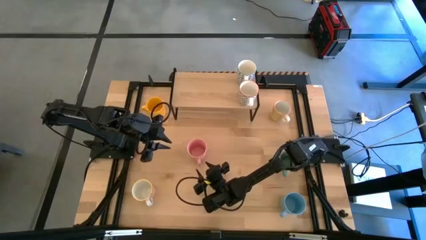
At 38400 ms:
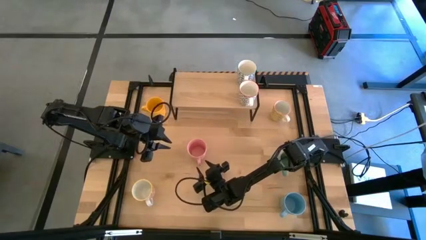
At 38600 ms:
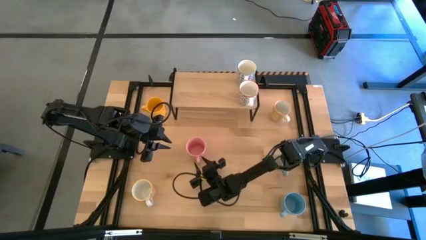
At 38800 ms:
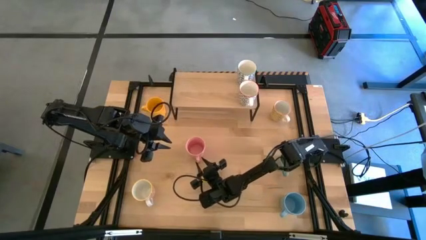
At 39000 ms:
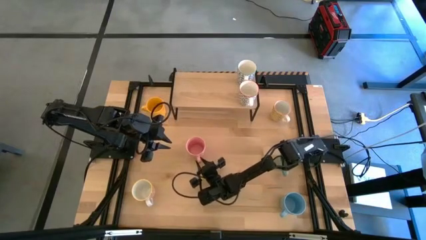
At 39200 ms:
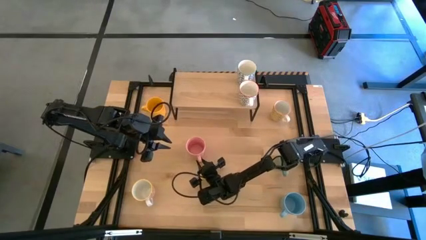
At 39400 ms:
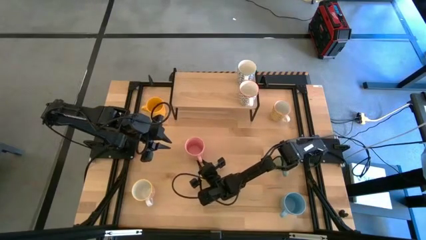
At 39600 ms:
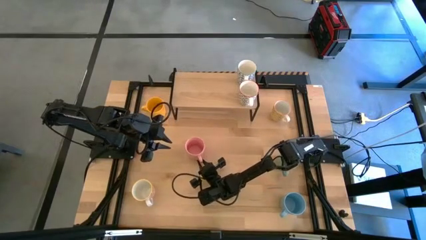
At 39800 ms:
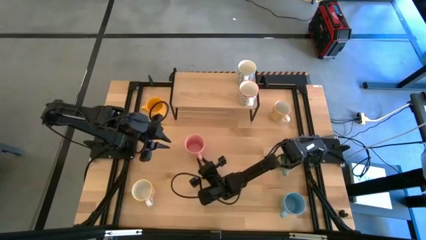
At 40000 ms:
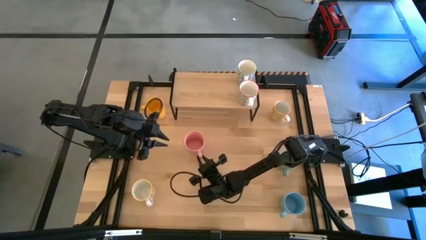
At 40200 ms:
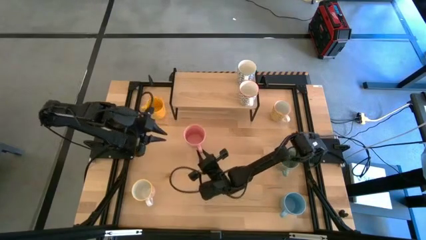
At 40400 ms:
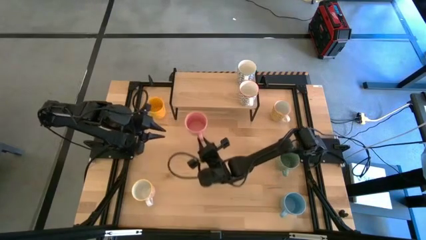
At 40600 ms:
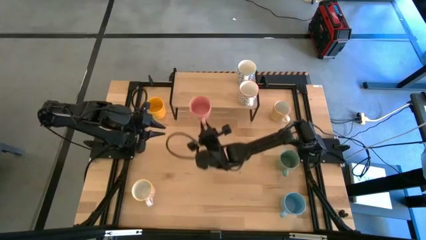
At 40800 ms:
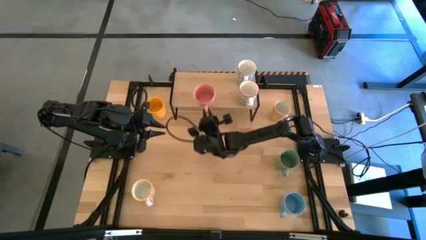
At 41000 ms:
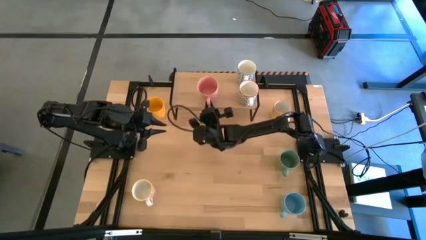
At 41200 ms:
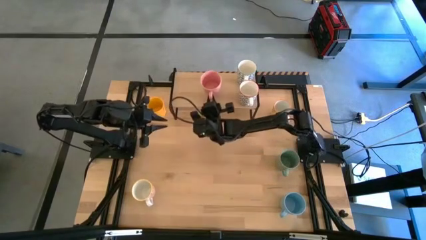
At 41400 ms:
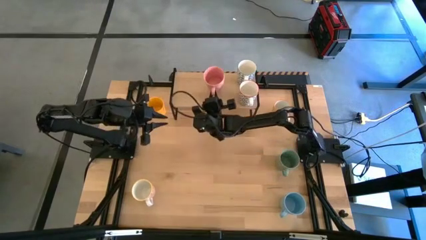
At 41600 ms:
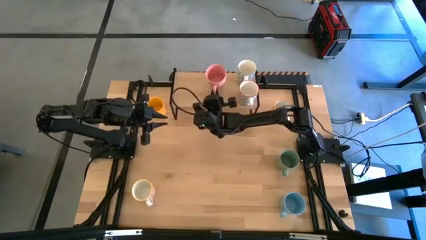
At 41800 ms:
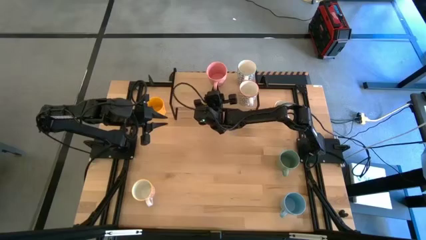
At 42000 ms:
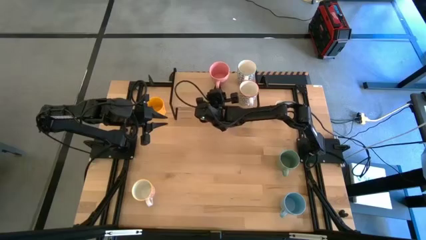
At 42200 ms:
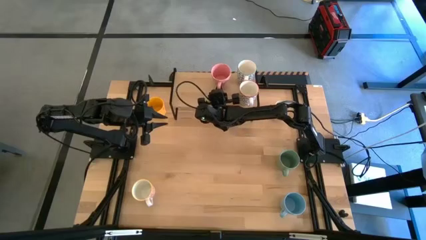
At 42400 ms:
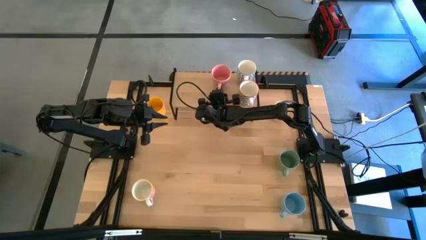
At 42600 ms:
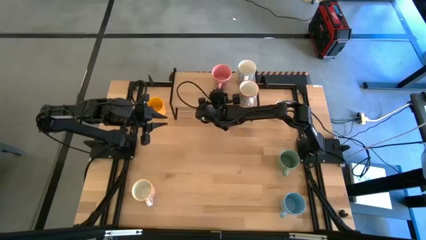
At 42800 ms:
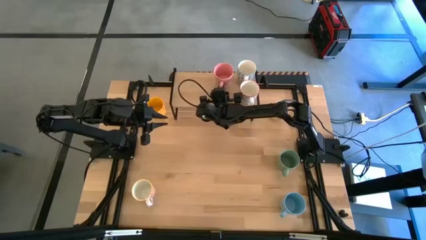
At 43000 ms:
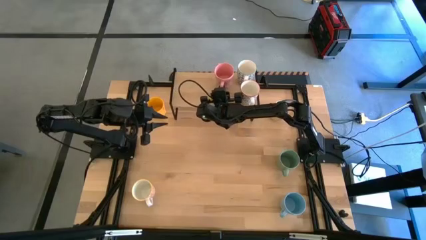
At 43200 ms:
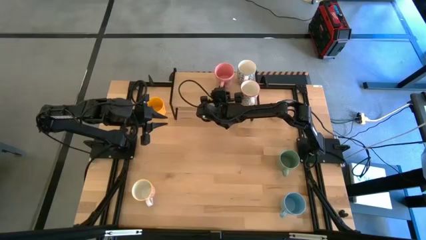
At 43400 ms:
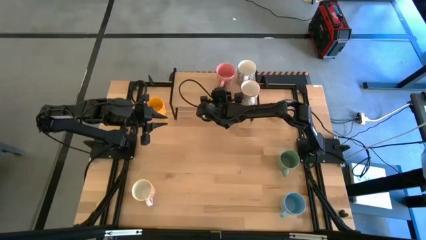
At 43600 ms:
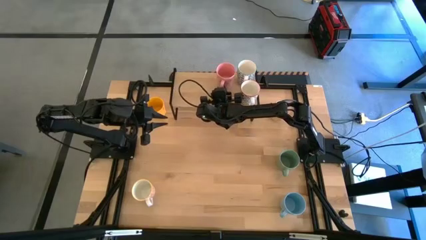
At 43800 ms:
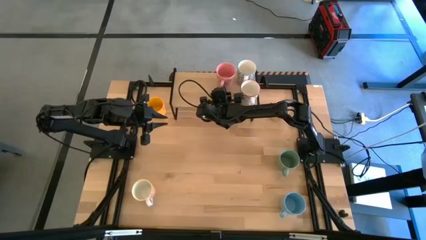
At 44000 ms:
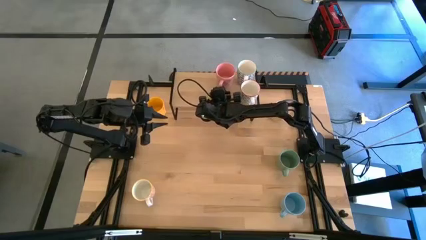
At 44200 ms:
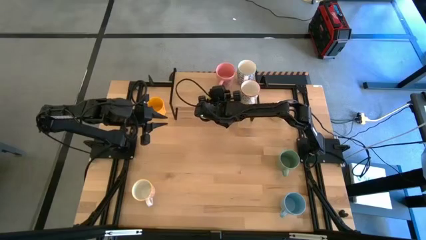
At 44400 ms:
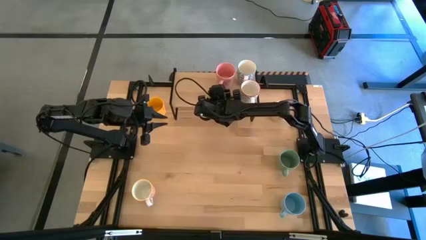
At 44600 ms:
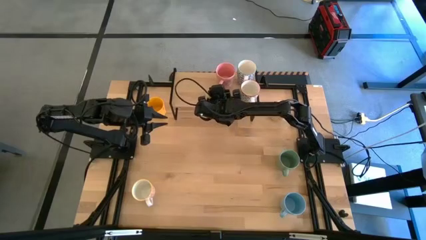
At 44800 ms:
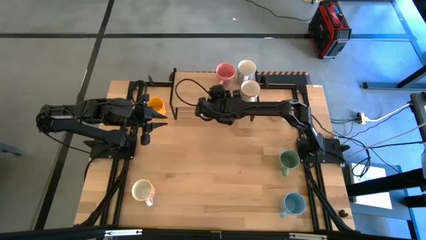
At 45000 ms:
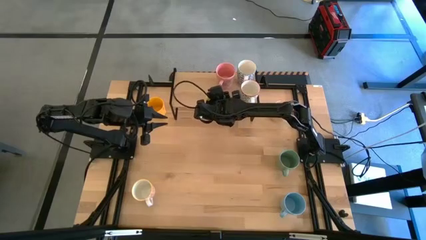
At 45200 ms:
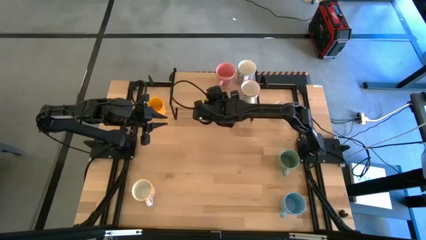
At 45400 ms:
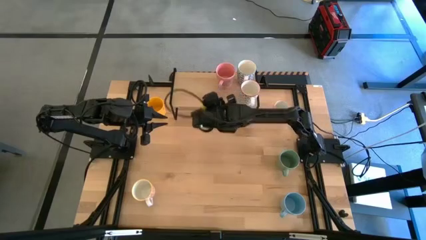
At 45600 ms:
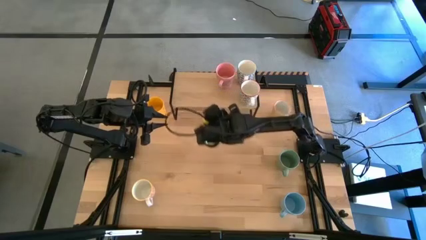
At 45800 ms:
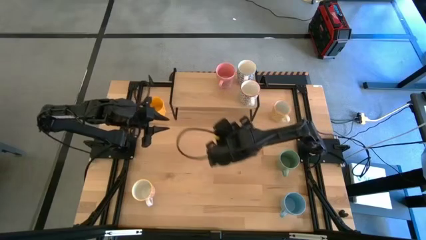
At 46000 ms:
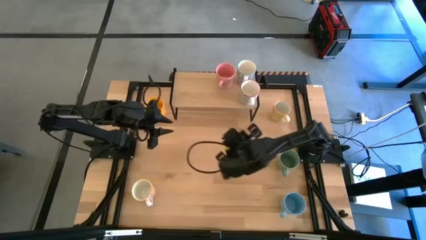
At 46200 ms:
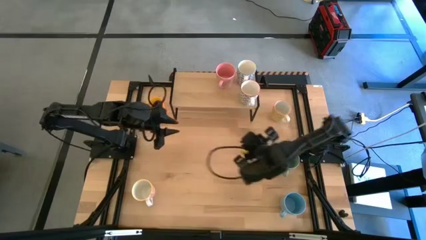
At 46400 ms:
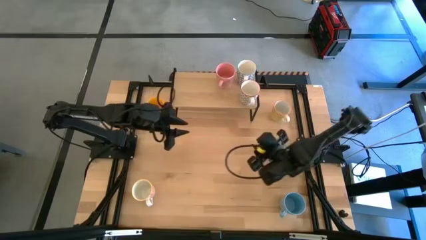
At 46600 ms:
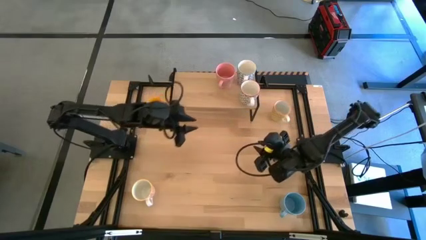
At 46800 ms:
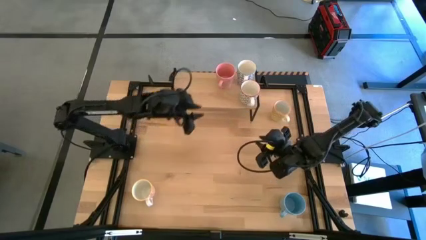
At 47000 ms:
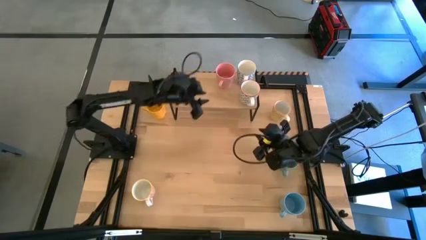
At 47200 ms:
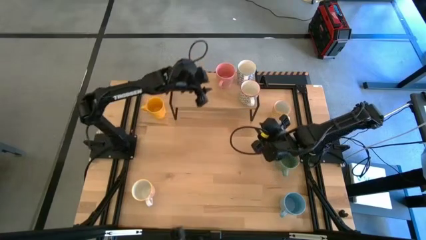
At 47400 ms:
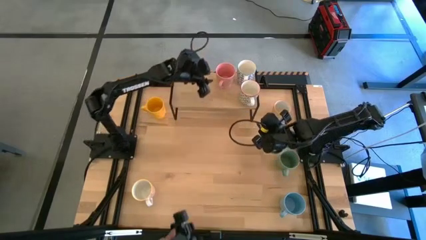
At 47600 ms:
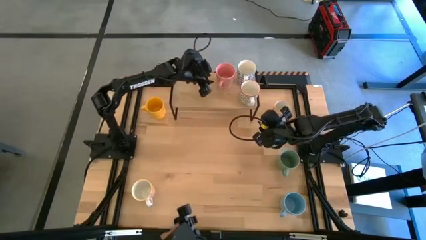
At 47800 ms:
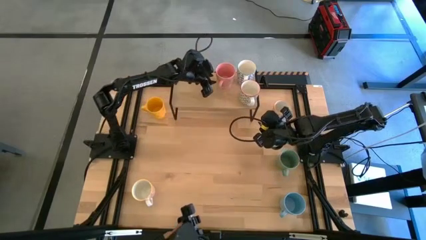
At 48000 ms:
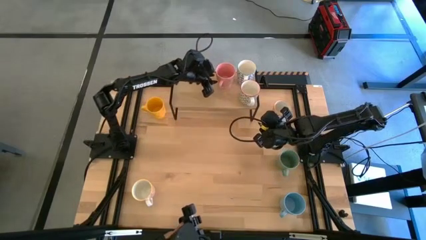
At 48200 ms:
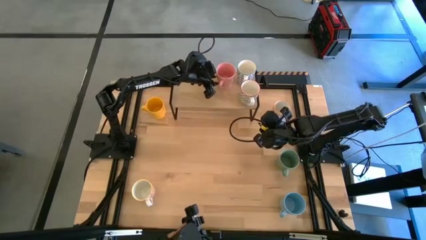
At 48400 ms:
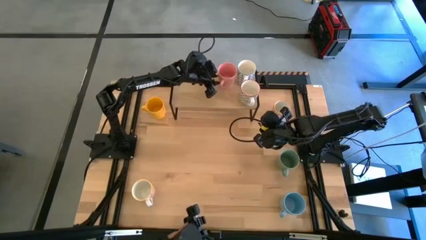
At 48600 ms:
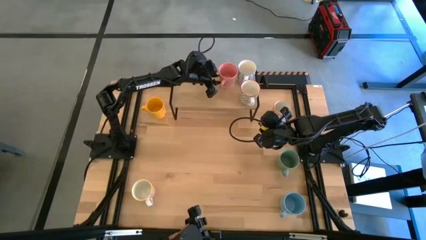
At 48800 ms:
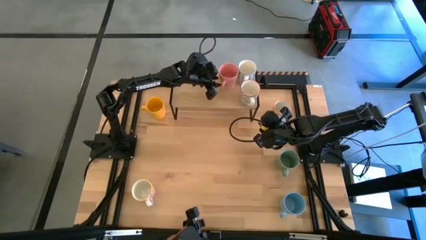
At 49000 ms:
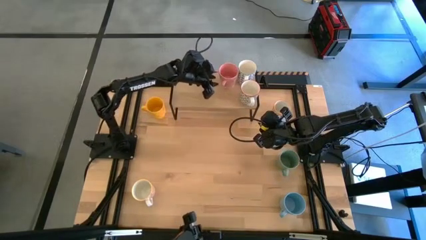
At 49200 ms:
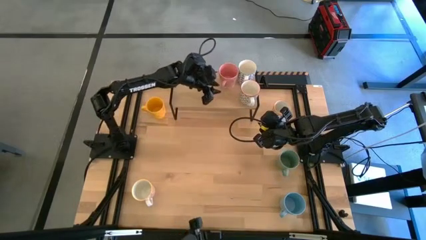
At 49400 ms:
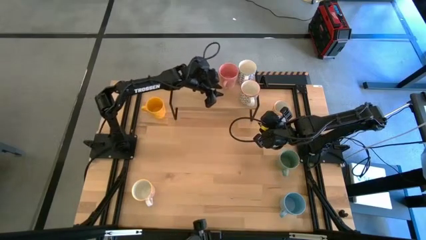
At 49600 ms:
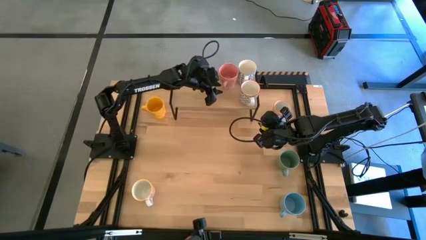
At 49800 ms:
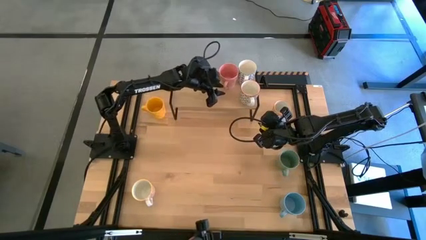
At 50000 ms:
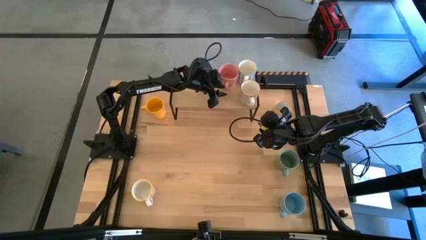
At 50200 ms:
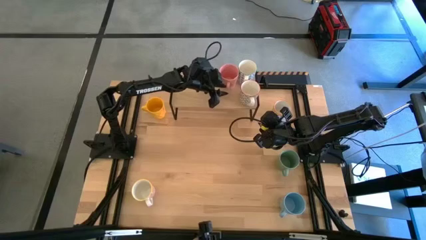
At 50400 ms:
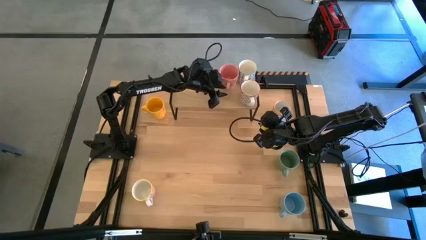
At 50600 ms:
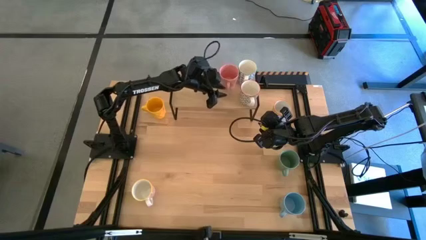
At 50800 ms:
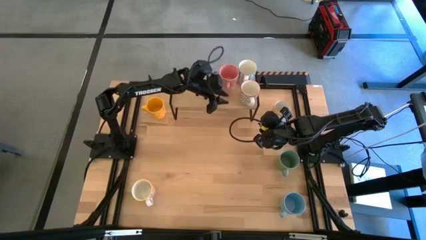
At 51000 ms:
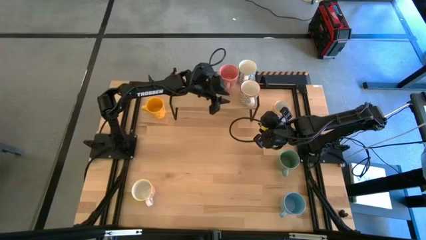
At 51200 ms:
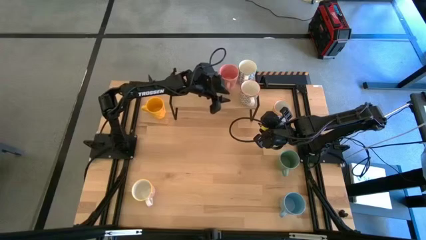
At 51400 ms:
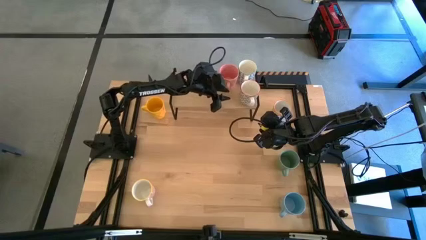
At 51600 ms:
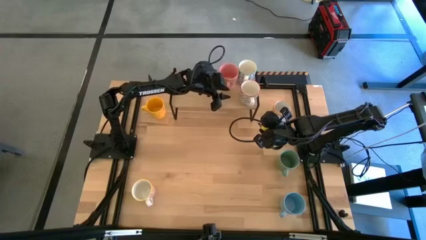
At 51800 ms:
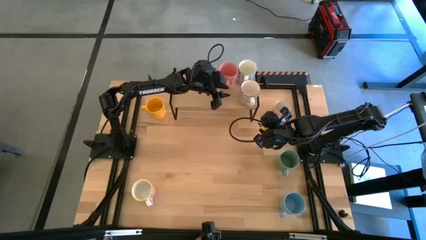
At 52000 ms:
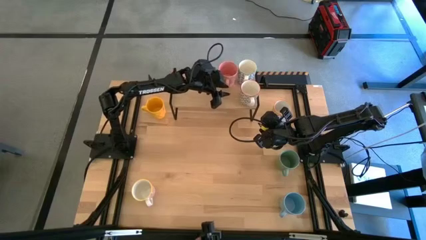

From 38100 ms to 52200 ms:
Task: Place coffee mugs
Put the pink mug on the shelf
